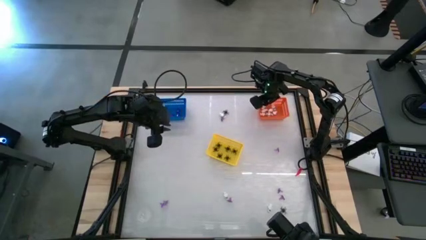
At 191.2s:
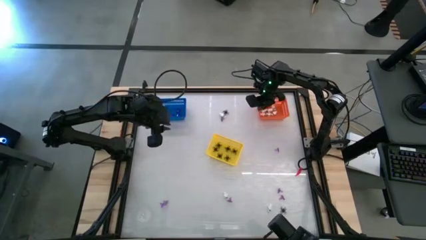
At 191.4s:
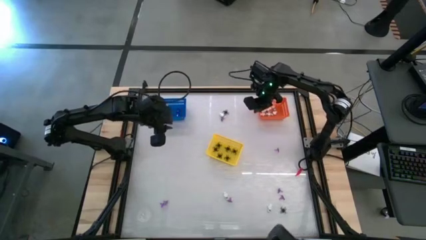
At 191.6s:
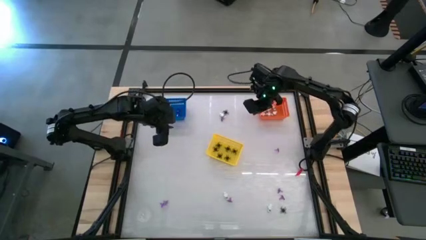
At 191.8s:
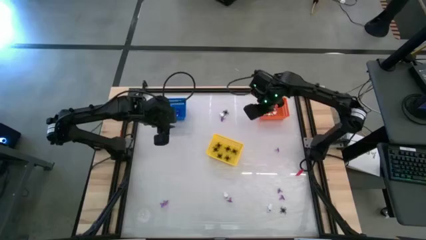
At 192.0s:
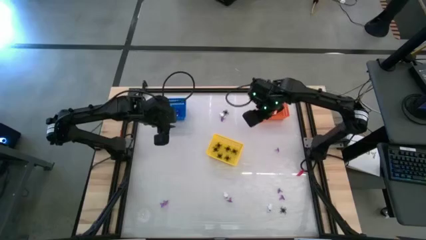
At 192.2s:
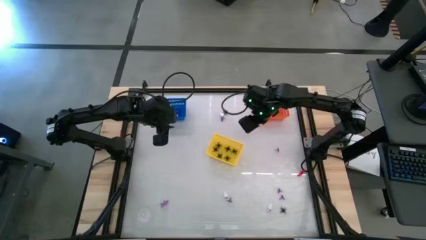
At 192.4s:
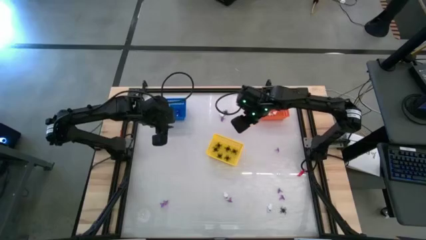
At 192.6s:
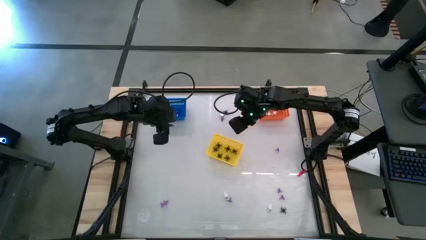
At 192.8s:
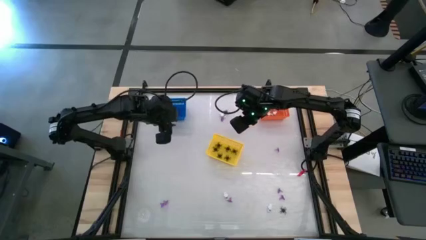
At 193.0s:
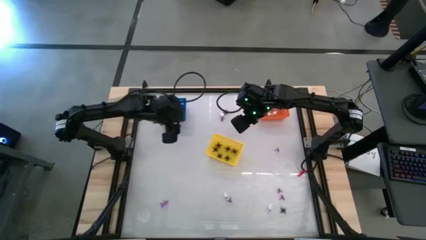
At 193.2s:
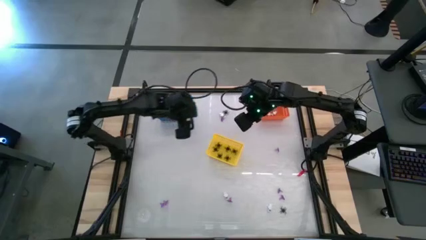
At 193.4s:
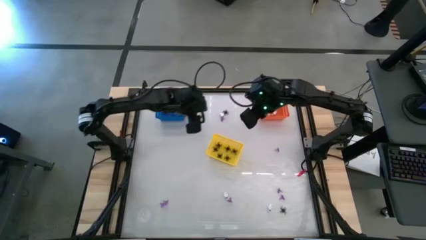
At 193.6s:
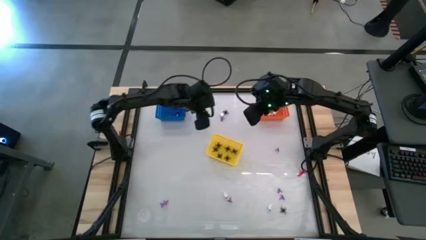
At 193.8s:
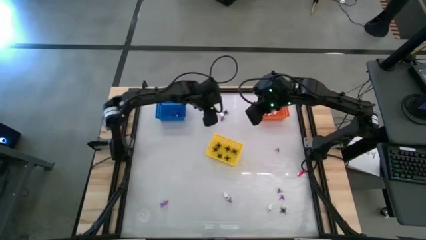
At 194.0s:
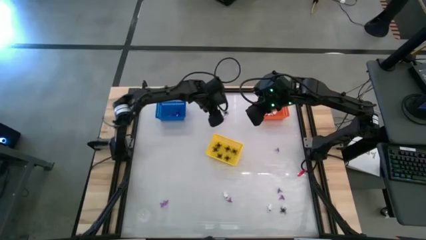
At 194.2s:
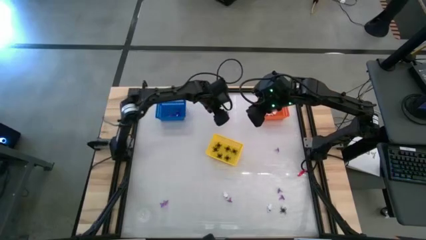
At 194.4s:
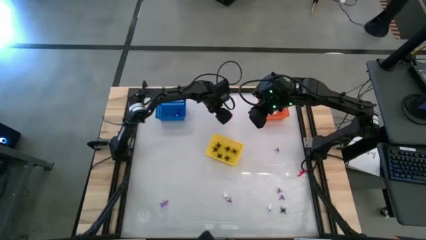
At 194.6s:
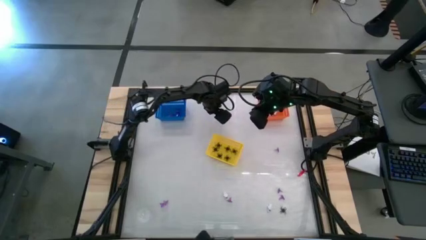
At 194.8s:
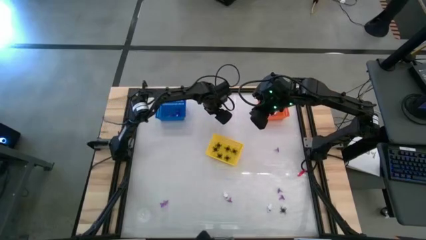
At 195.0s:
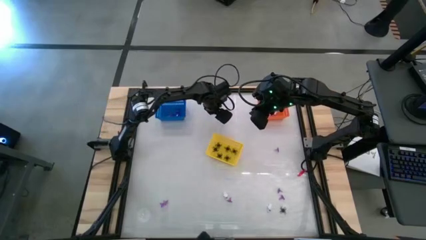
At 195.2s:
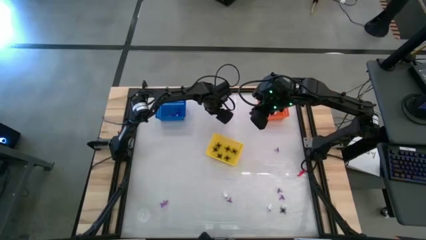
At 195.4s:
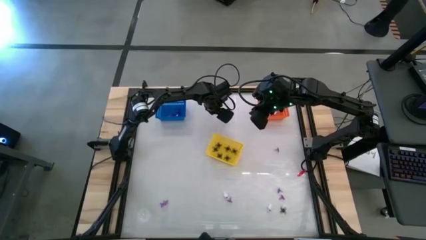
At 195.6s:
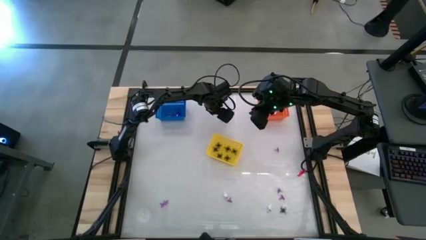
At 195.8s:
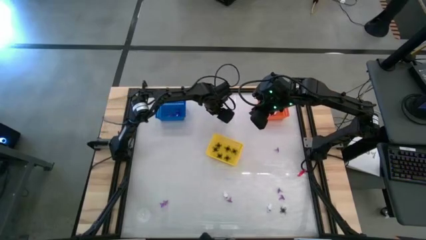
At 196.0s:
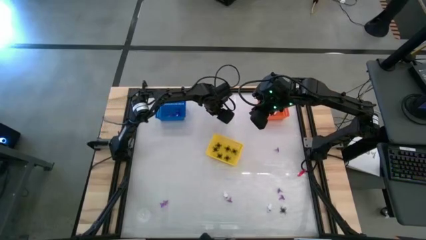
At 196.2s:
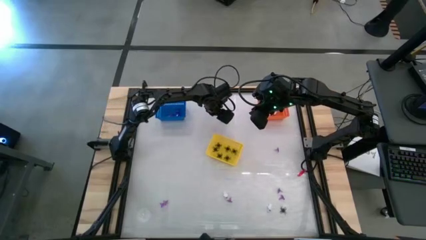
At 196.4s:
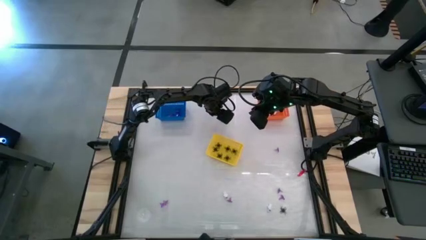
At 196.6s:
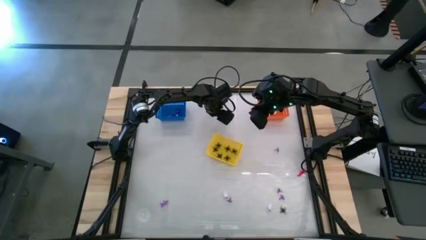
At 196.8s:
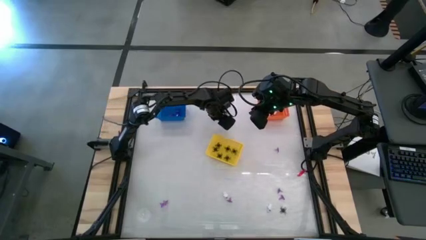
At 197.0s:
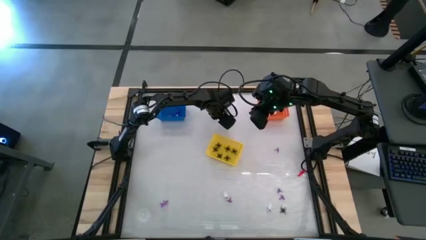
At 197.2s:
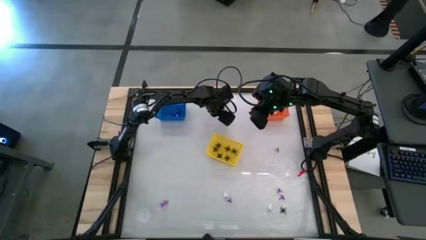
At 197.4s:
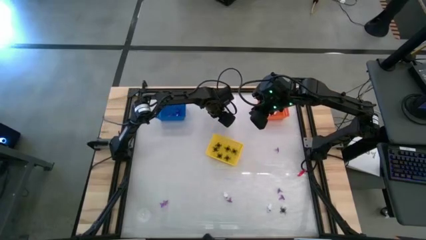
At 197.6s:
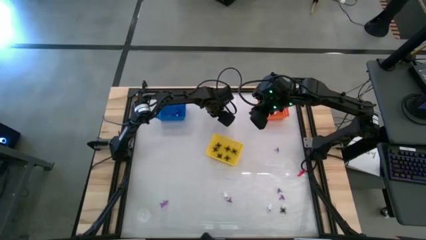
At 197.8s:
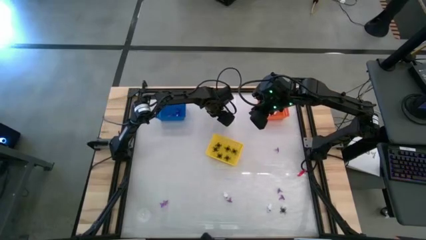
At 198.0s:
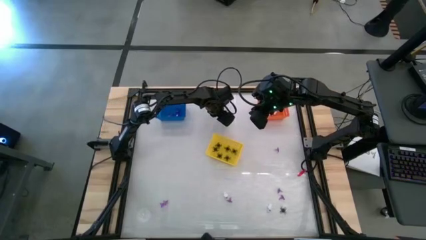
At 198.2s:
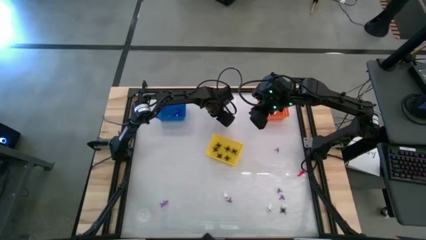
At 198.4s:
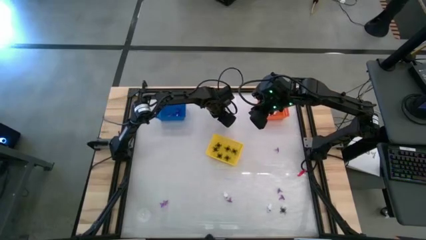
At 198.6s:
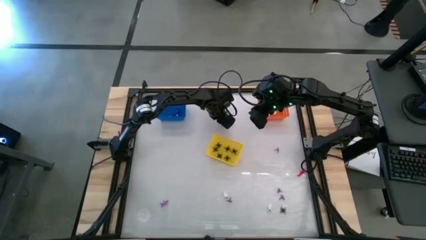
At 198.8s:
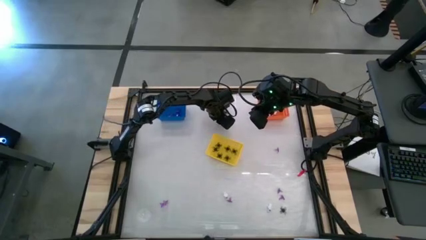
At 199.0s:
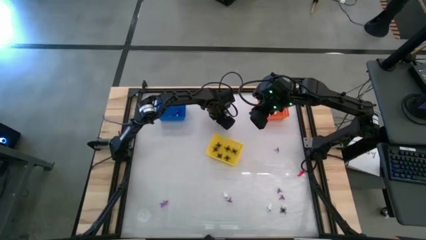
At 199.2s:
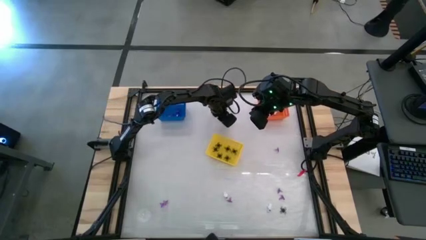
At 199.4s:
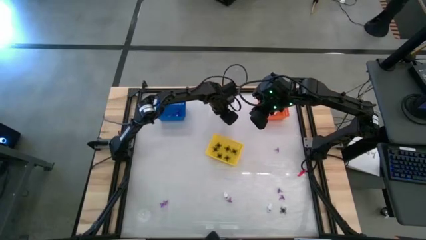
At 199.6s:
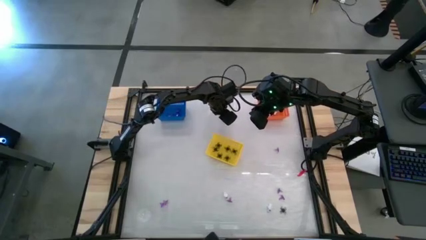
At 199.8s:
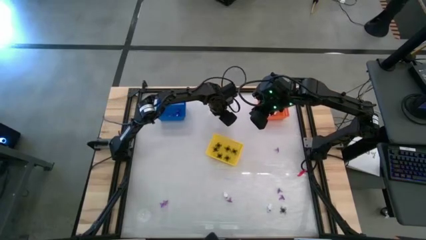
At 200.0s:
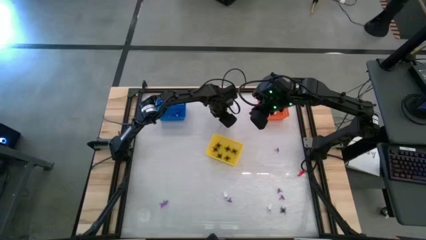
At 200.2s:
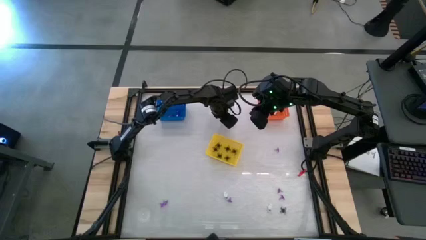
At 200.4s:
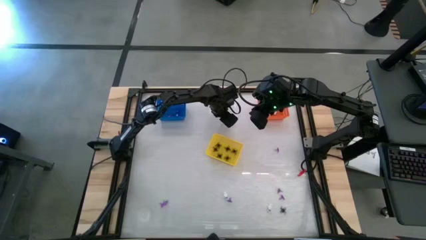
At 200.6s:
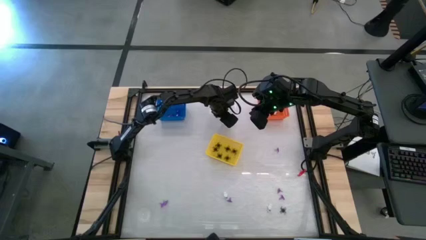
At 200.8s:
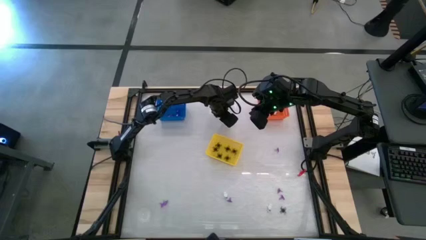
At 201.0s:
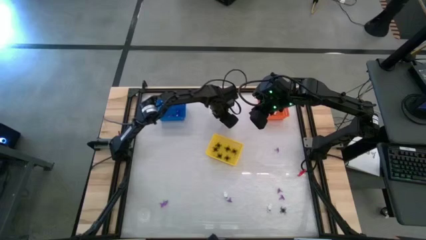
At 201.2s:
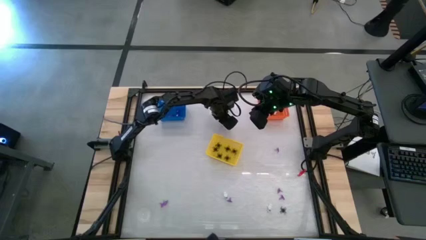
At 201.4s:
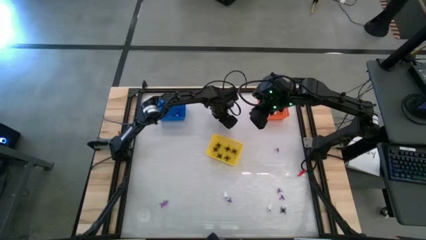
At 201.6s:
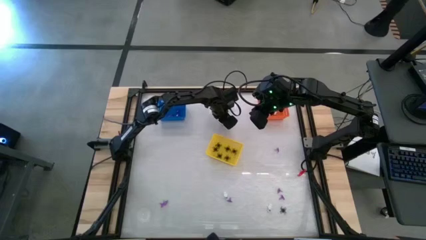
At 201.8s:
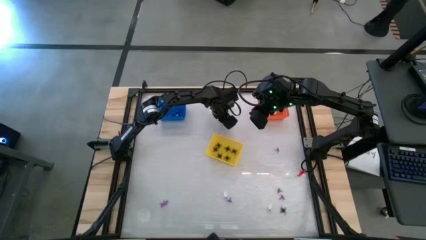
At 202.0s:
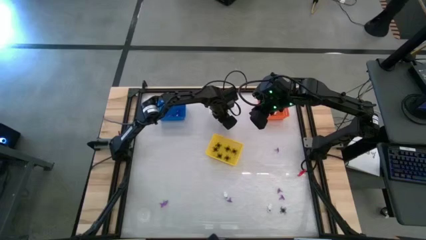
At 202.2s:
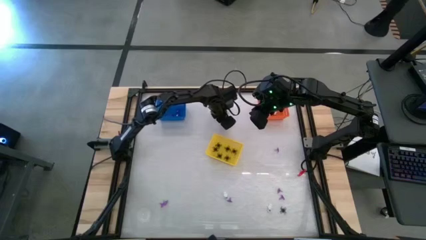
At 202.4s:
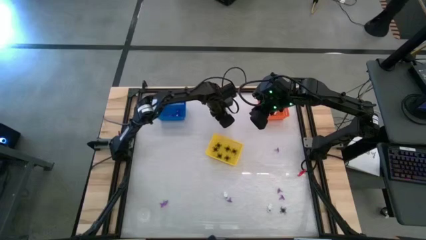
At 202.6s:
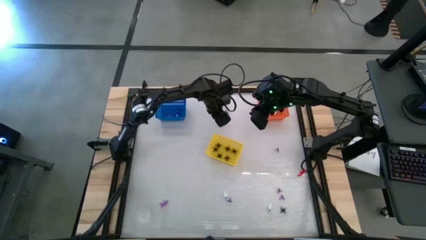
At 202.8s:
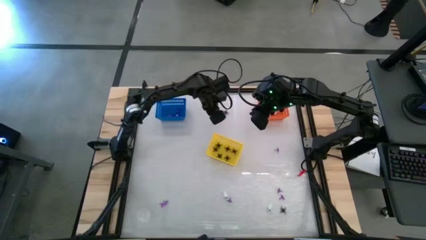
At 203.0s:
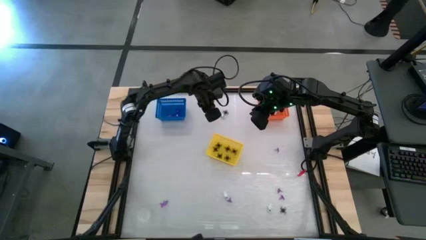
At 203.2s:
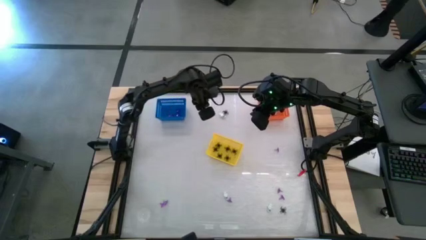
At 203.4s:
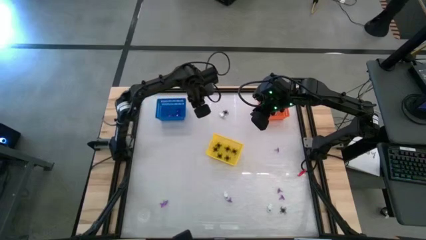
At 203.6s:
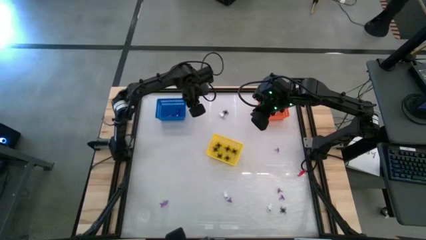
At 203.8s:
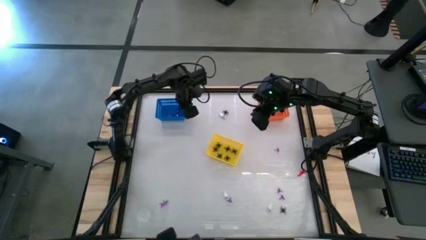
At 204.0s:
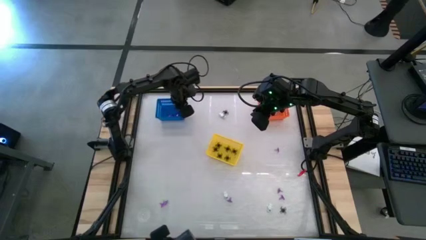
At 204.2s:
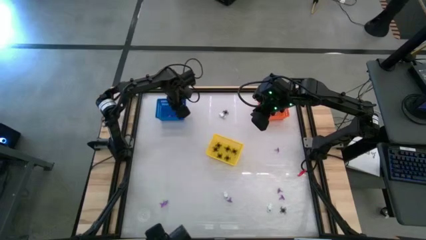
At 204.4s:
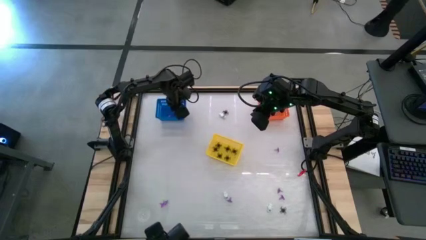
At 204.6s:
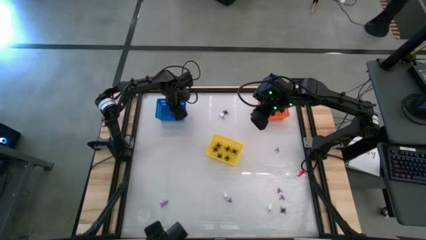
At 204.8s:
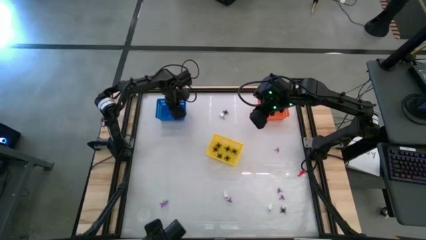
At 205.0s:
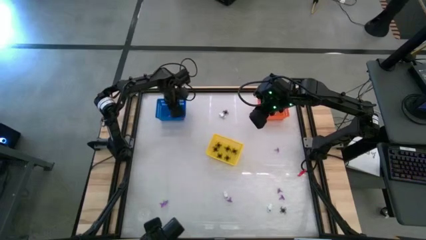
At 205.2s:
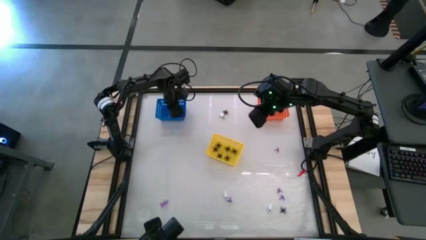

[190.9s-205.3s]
Task: Sort Halloween decoration
Put the purple witch hat toy into the blue bin
